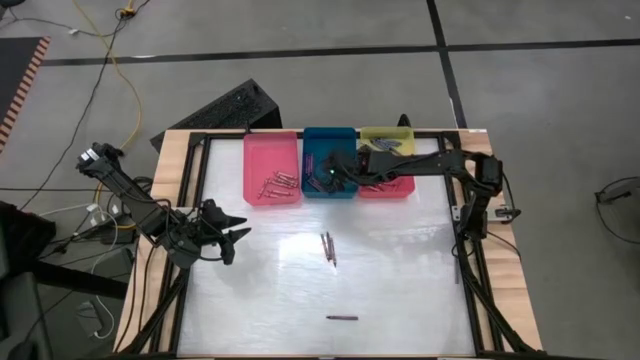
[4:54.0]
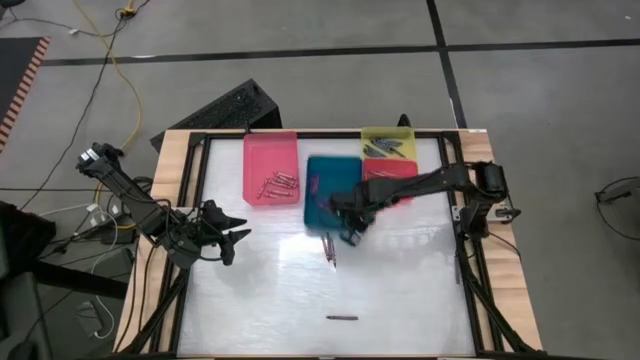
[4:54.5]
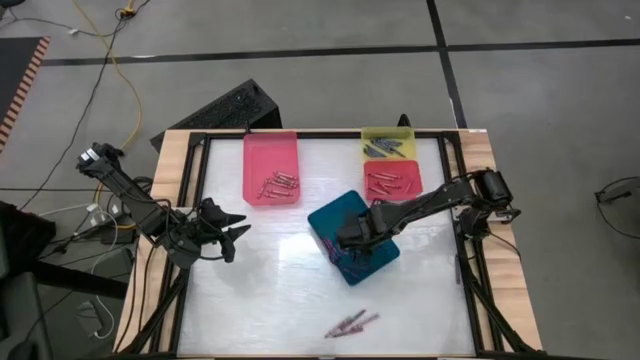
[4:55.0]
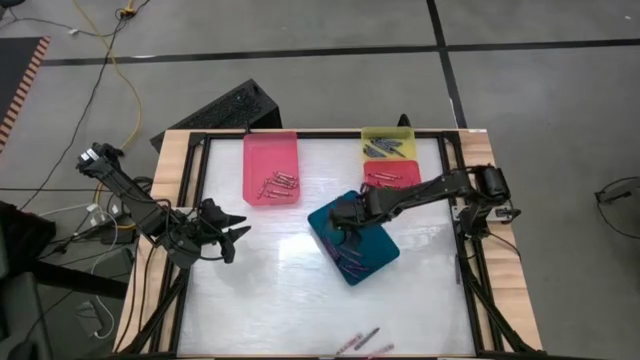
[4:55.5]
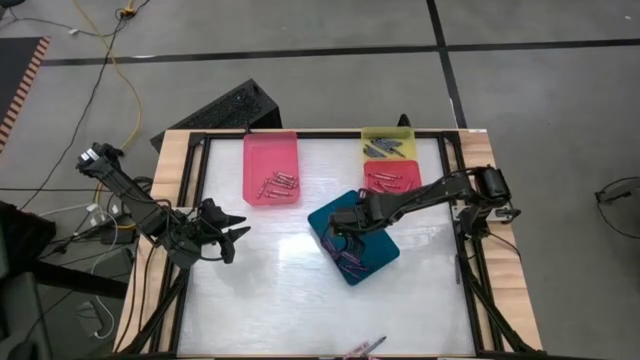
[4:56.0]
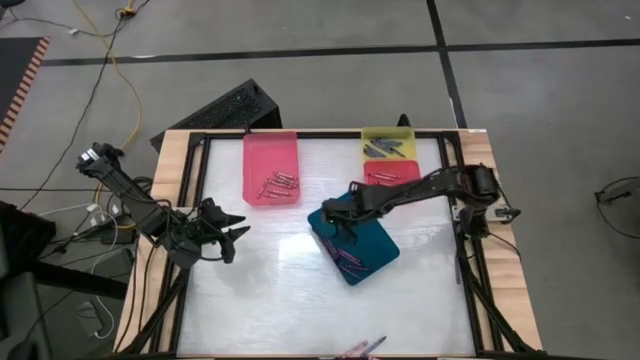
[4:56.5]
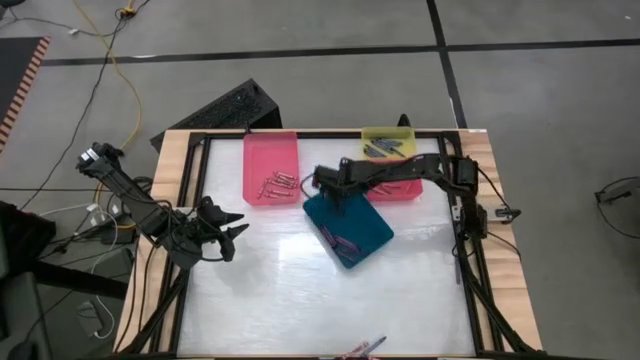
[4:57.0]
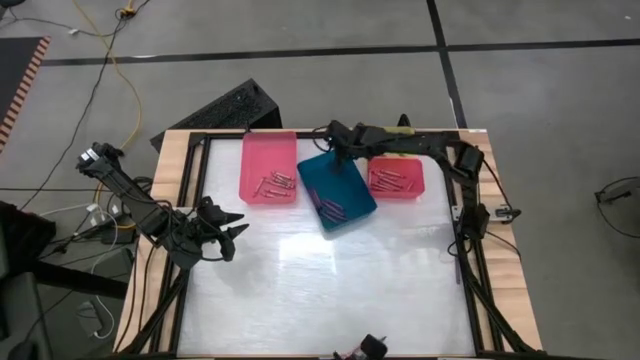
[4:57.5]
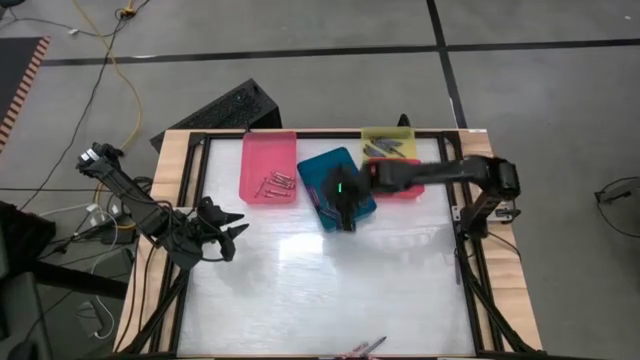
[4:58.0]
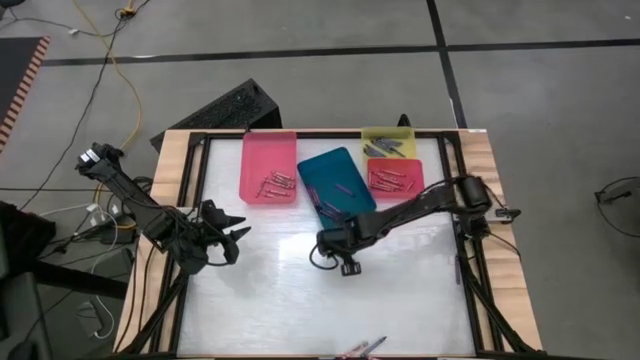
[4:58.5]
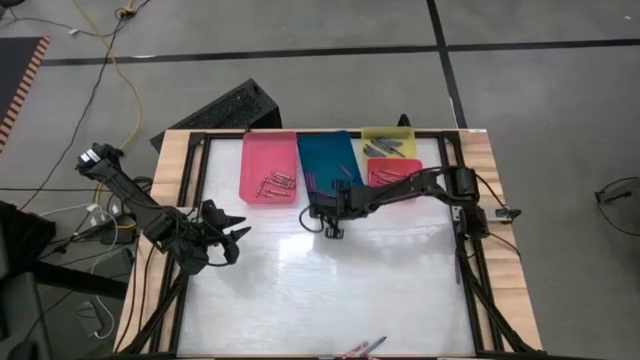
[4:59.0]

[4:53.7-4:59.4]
Task: Sort crayons
Adjust the blue bin

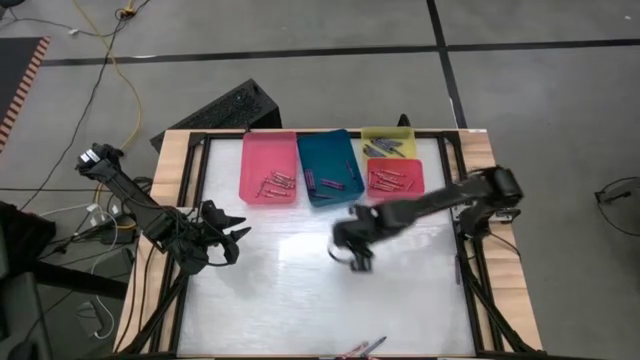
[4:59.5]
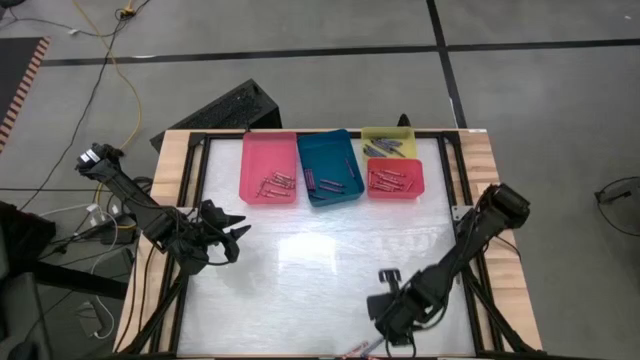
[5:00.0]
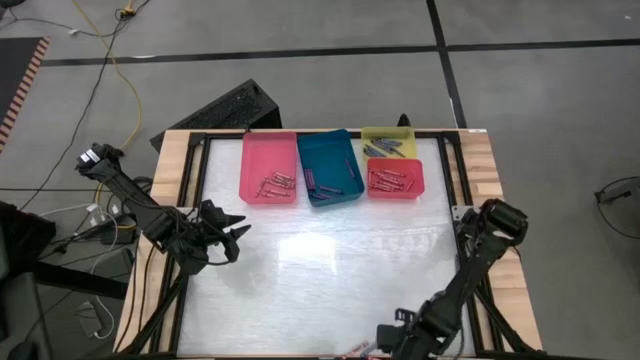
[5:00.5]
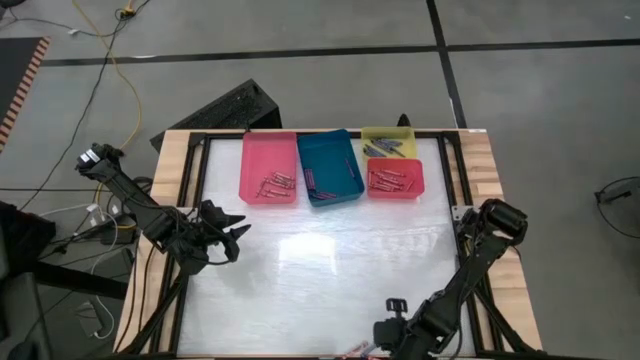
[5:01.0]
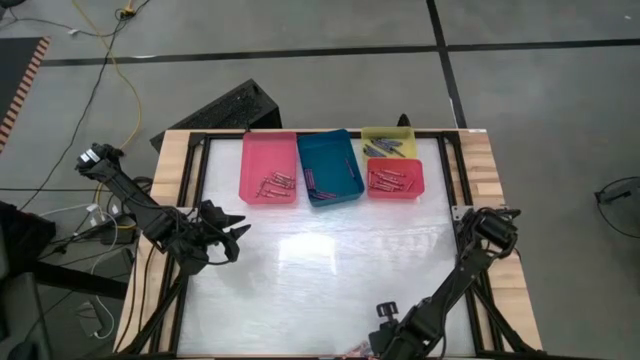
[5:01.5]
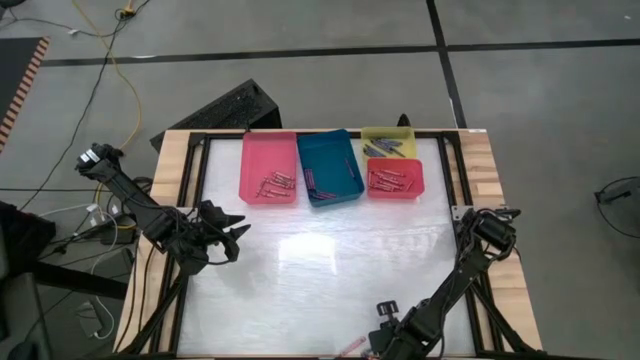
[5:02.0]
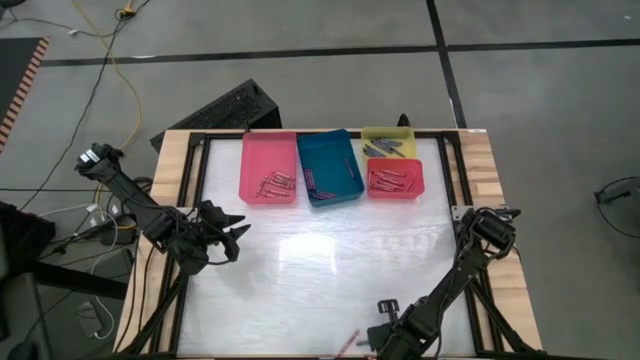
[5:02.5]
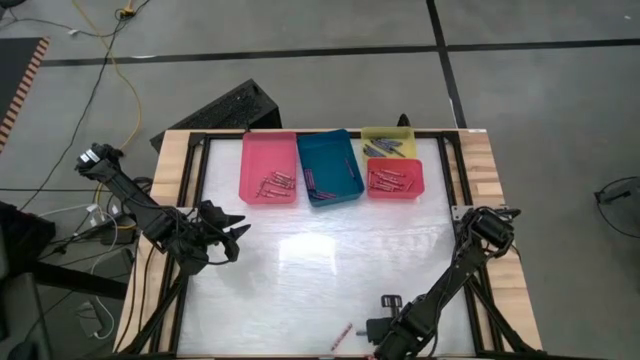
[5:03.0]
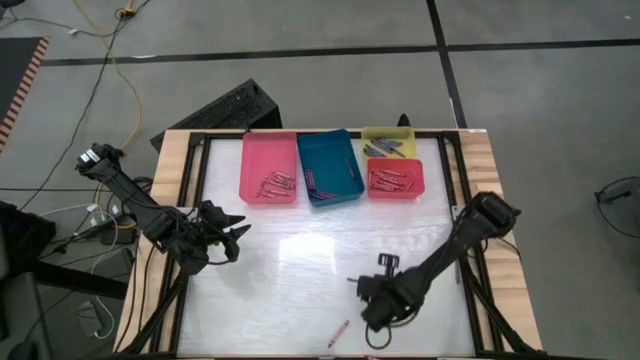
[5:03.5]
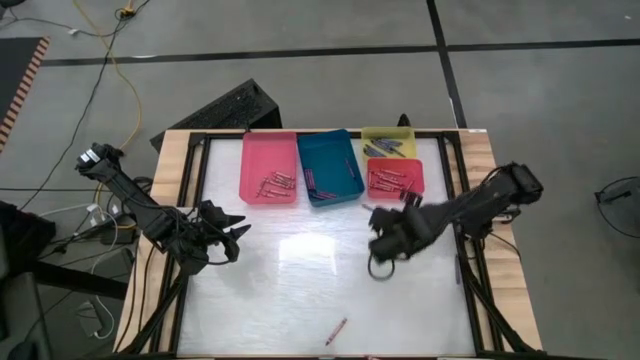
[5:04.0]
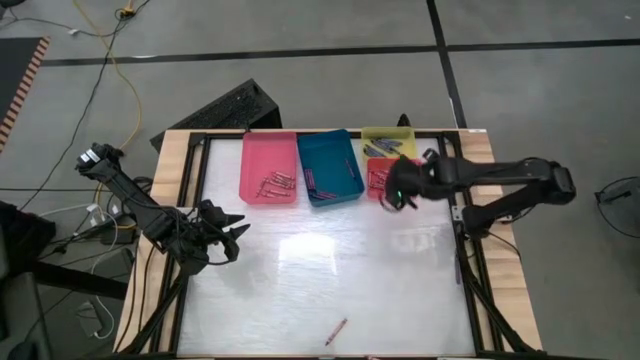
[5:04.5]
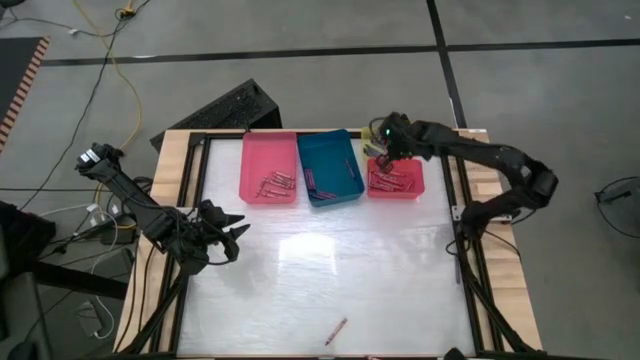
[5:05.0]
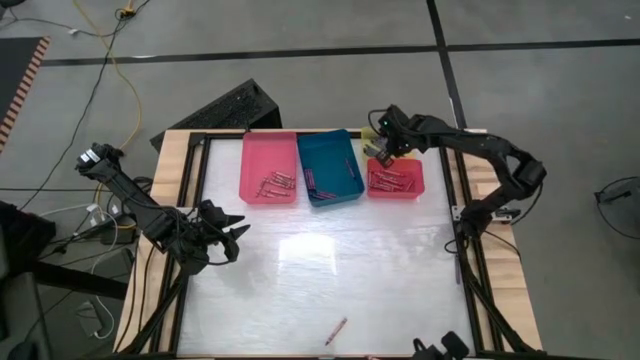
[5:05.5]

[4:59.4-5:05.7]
Put the blue crayon into the yellow bin

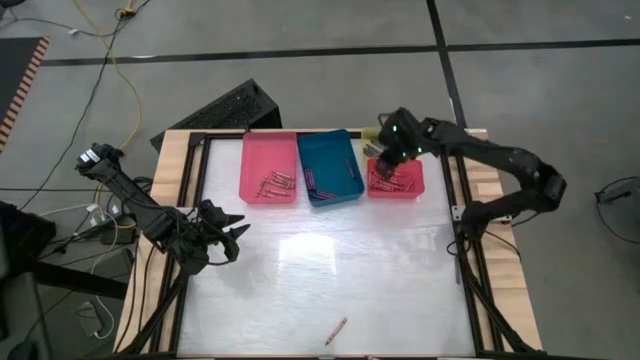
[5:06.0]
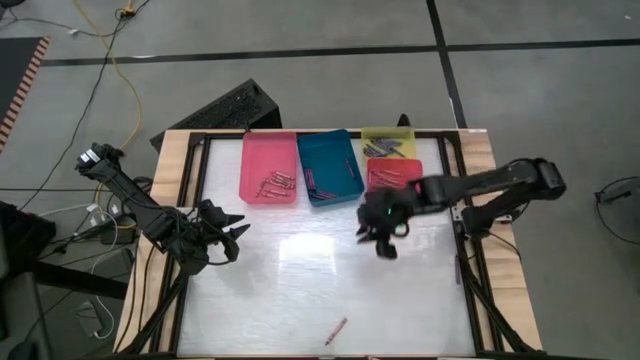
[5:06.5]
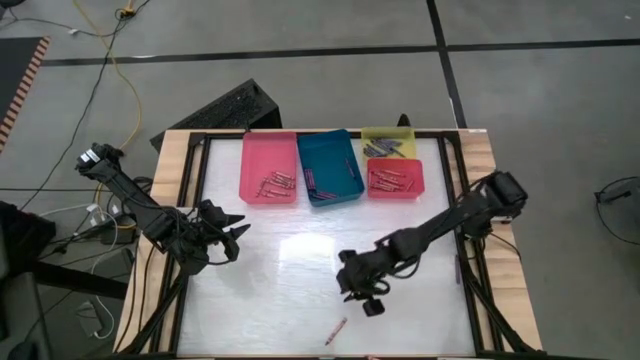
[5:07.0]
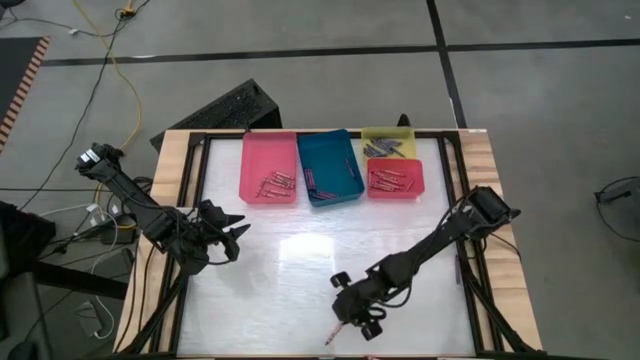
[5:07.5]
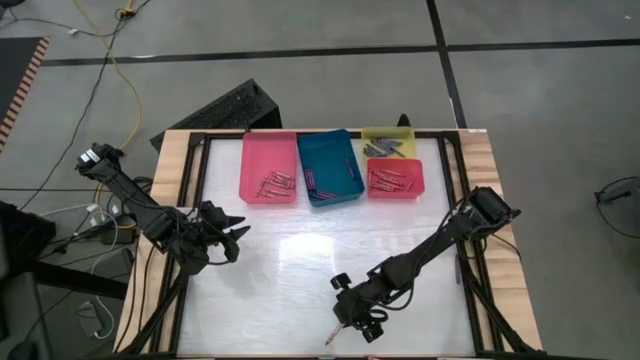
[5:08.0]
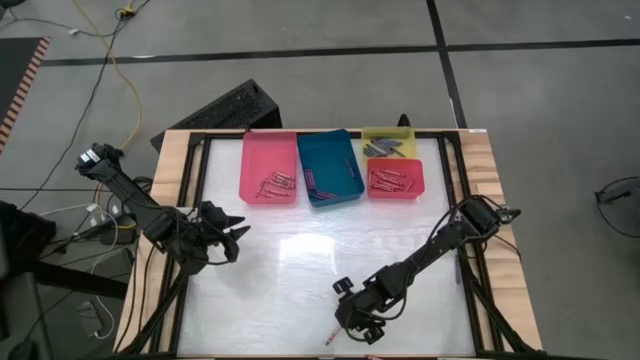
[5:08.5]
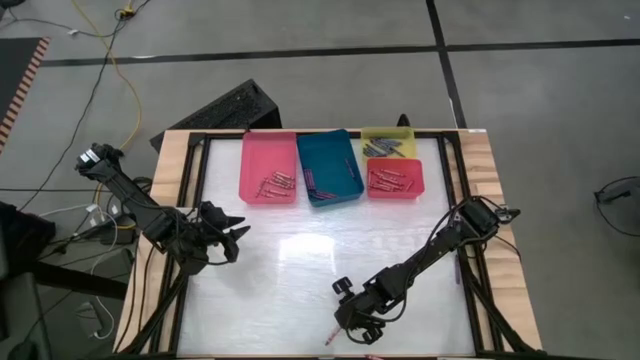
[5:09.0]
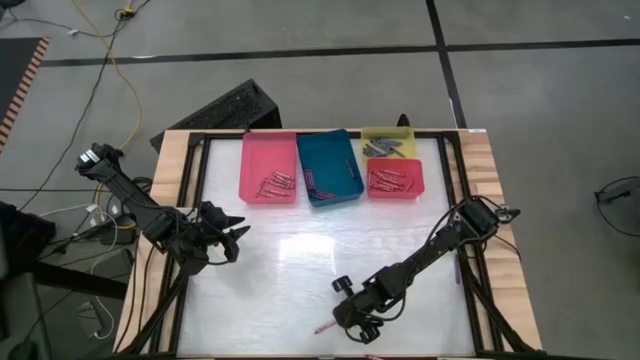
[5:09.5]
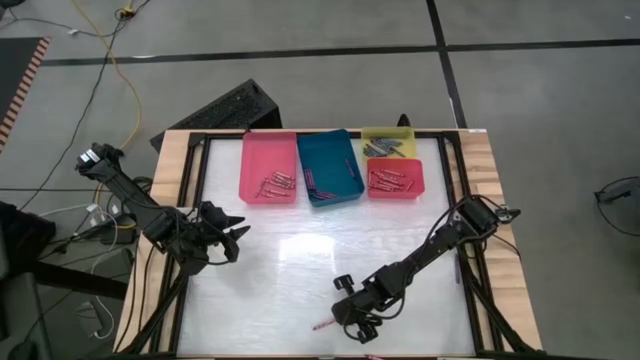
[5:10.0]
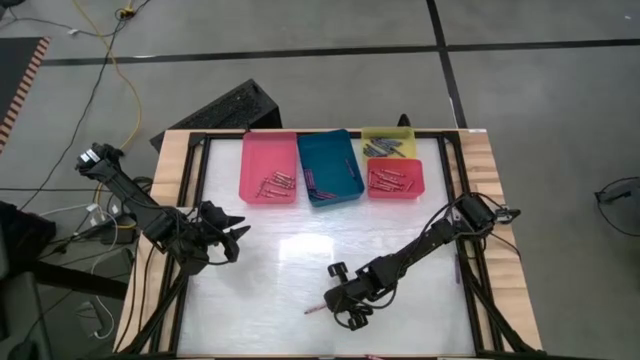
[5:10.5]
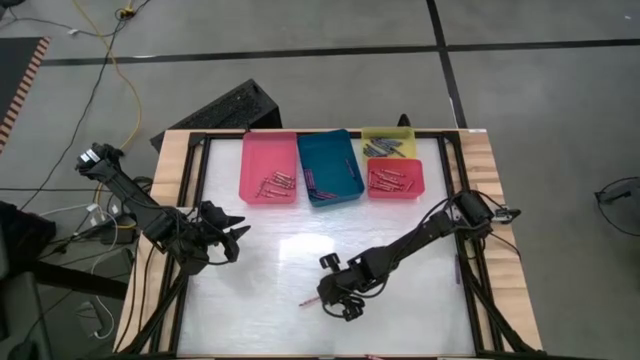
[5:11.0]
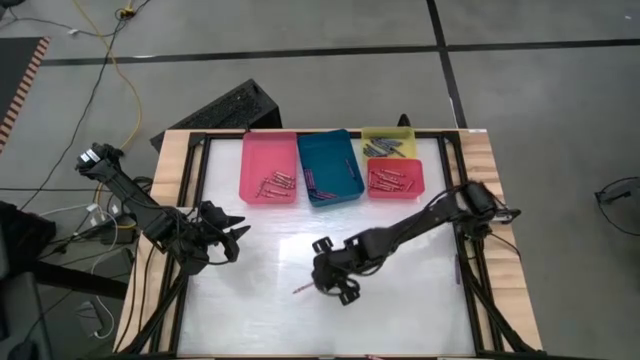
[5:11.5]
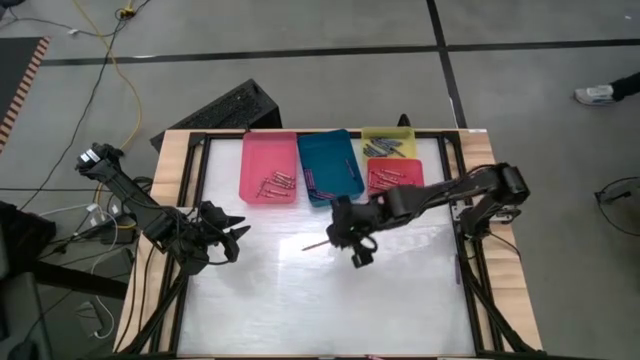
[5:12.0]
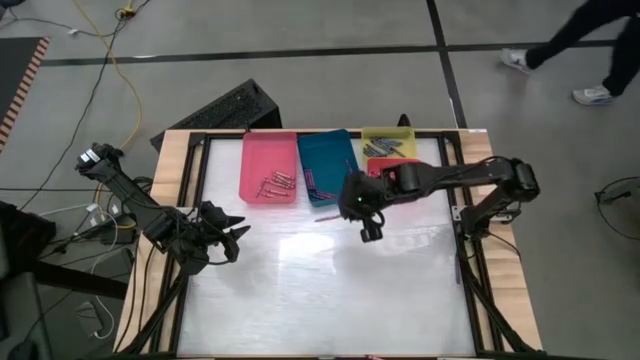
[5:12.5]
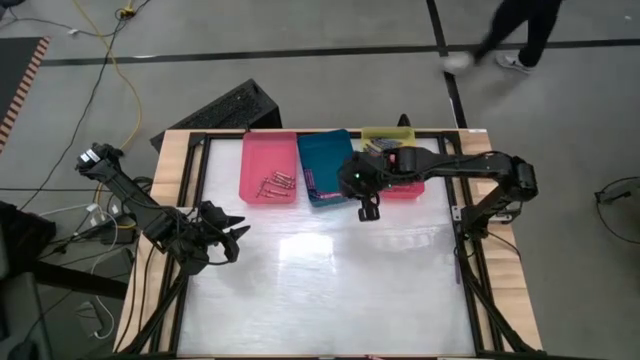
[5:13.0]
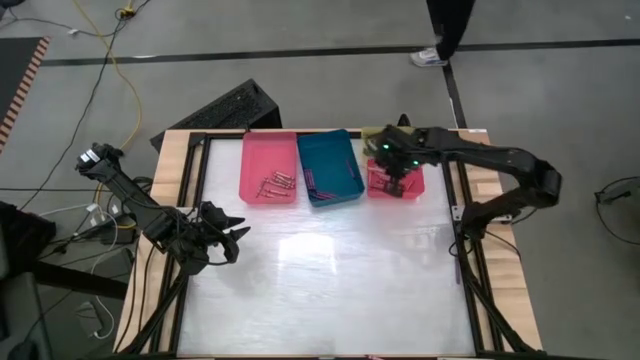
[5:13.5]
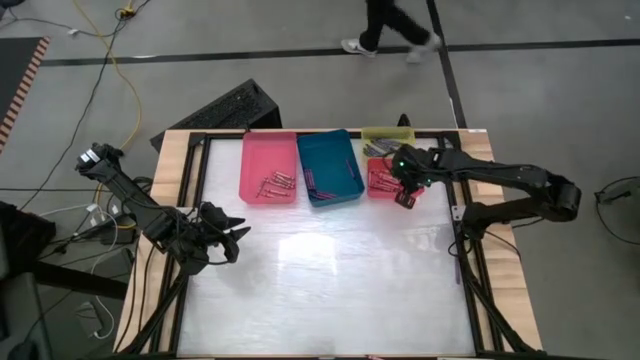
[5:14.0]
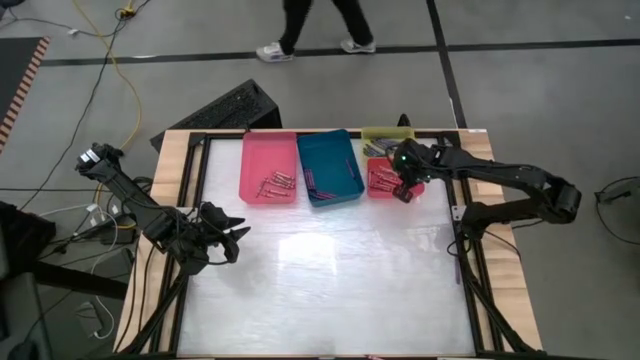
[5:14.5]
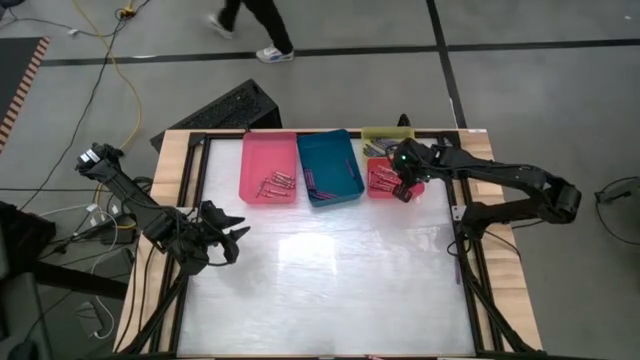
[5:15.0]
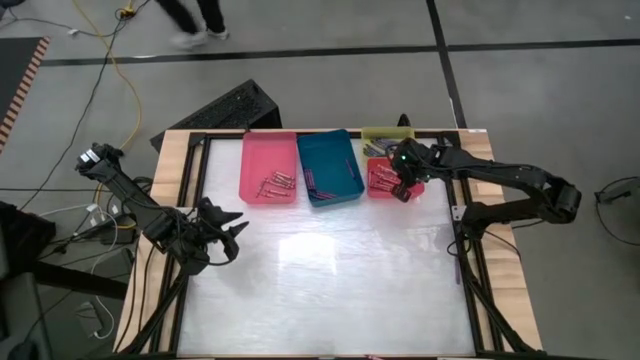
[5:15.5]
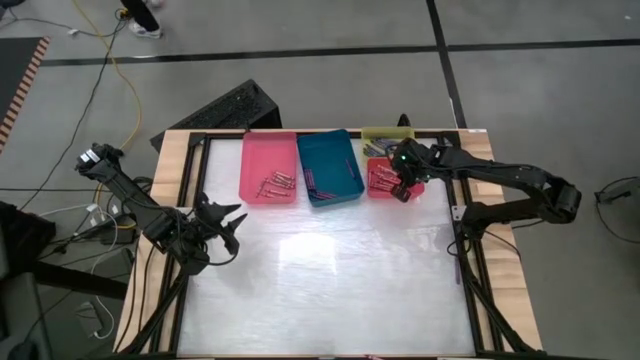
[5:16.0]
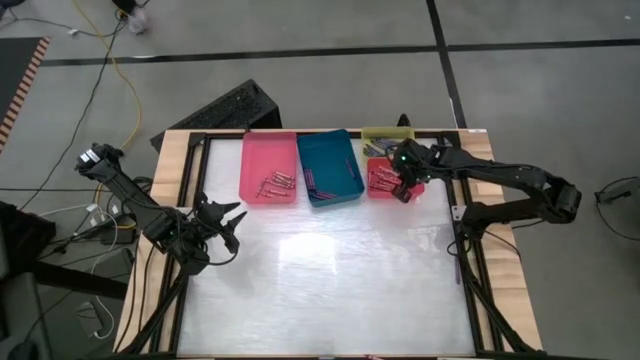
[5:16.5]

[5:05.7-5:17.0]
Put the red crayon into the red bin
